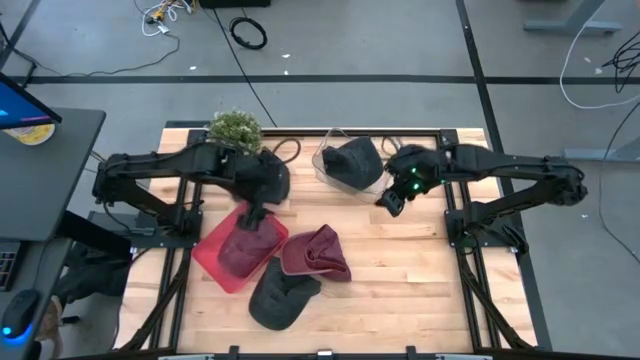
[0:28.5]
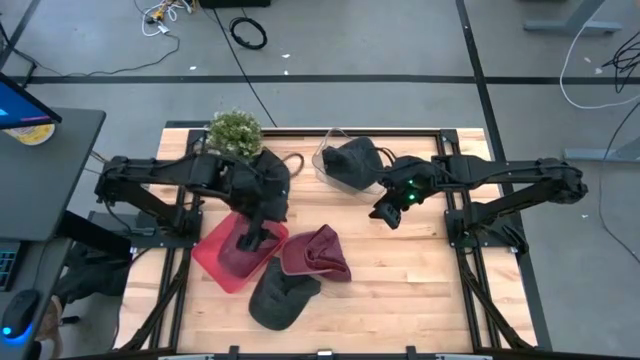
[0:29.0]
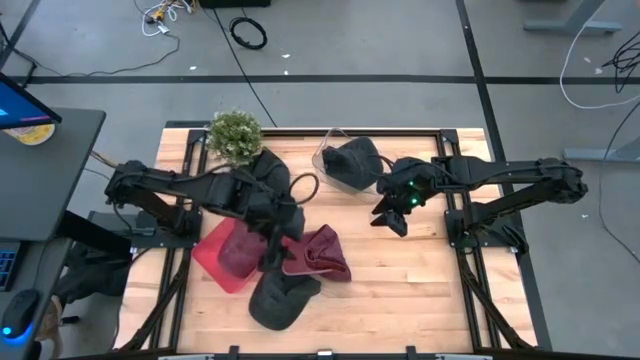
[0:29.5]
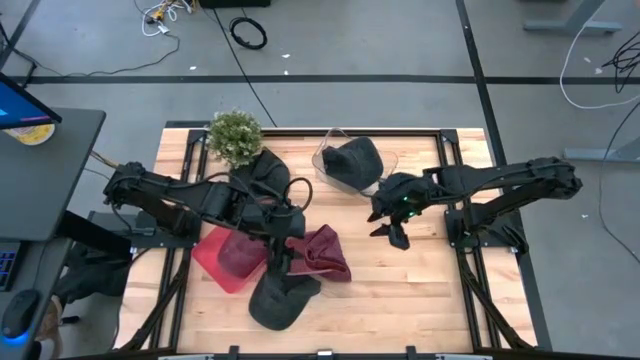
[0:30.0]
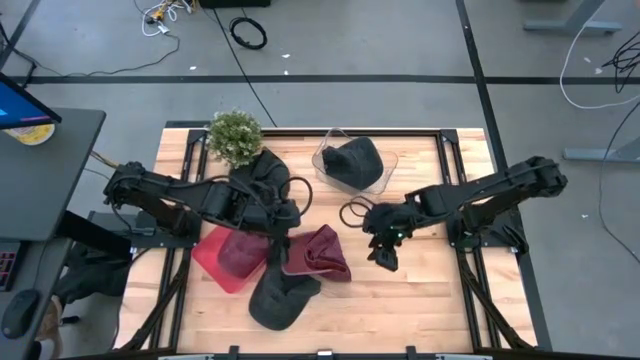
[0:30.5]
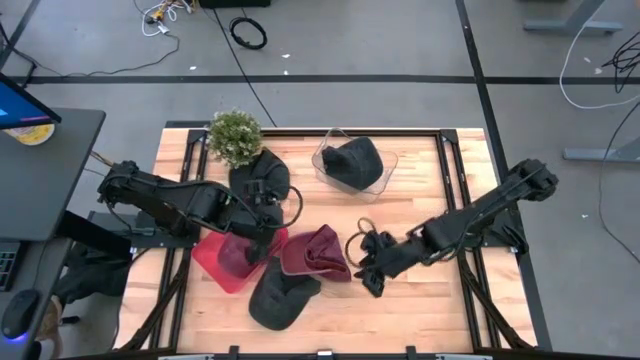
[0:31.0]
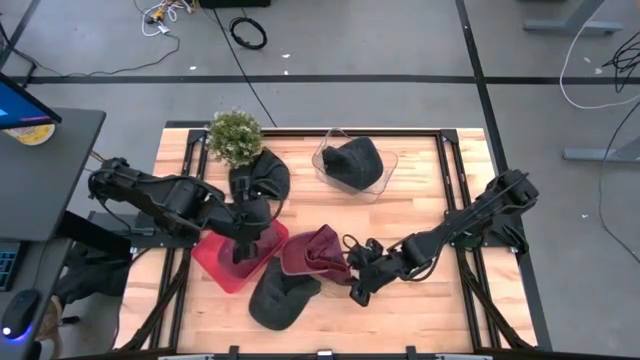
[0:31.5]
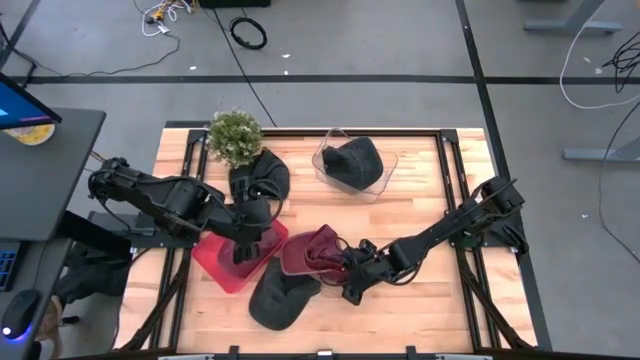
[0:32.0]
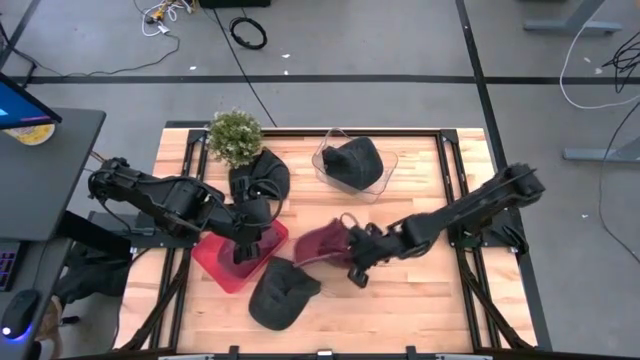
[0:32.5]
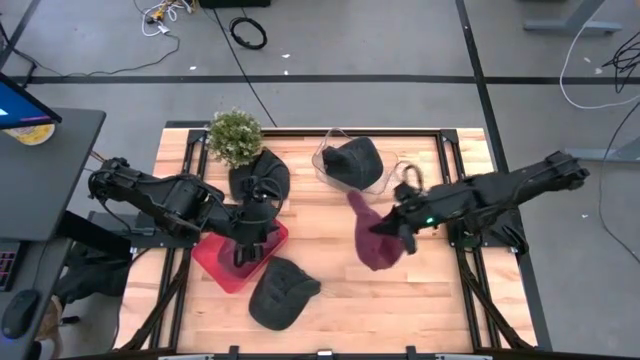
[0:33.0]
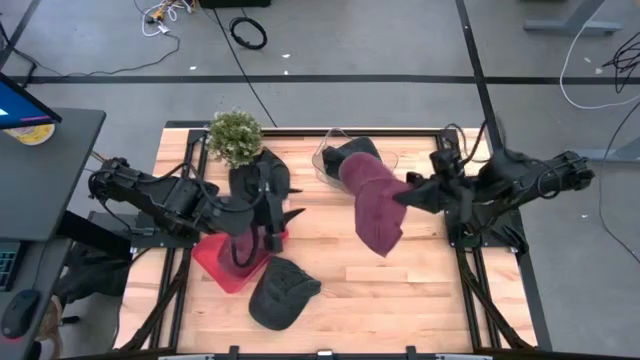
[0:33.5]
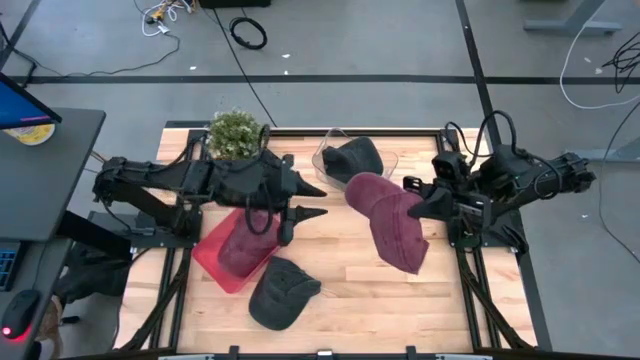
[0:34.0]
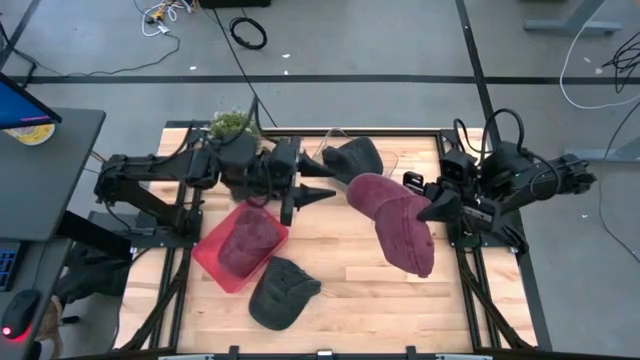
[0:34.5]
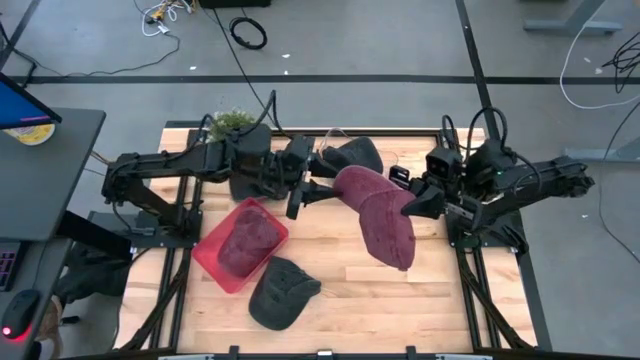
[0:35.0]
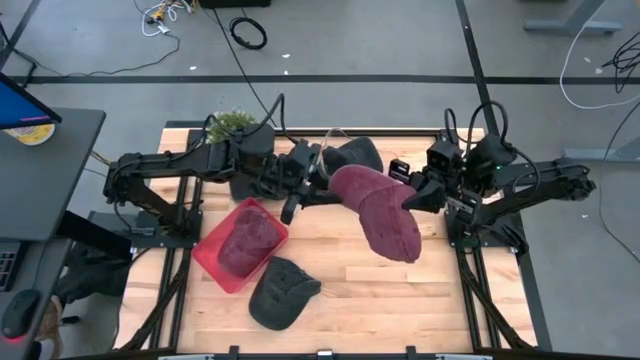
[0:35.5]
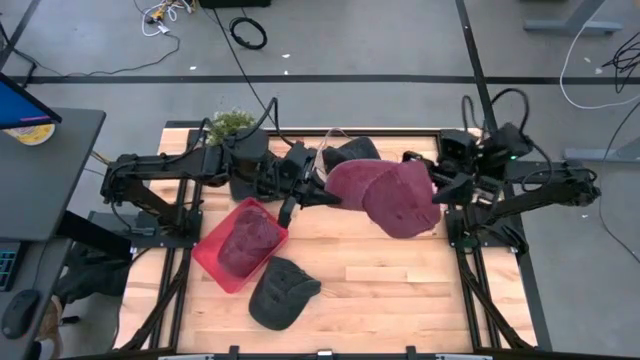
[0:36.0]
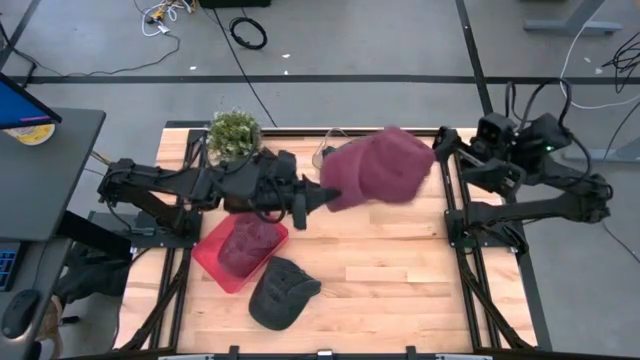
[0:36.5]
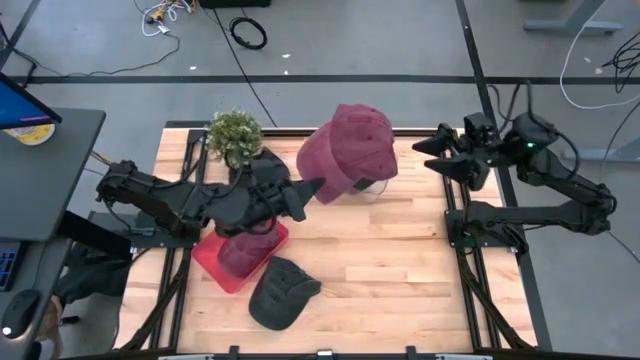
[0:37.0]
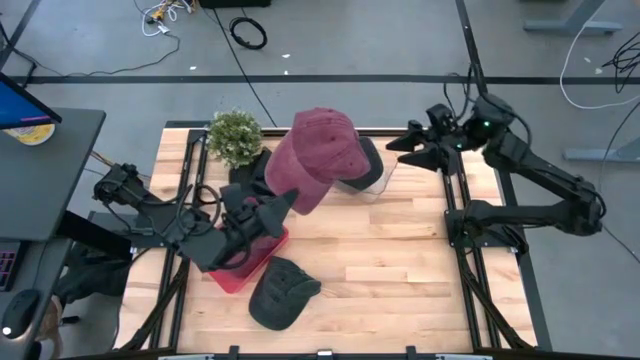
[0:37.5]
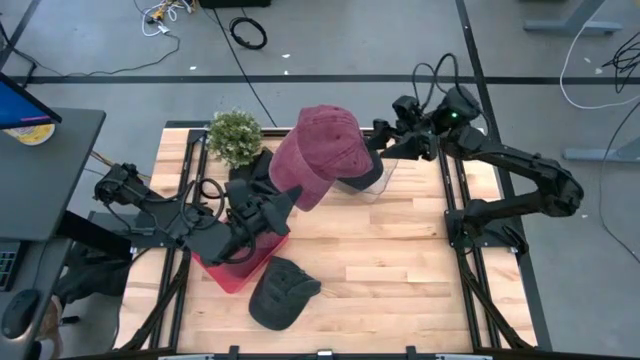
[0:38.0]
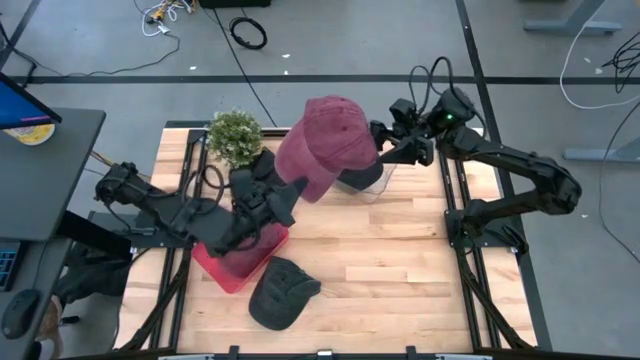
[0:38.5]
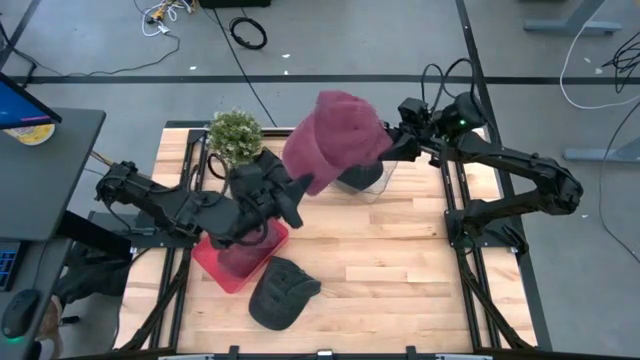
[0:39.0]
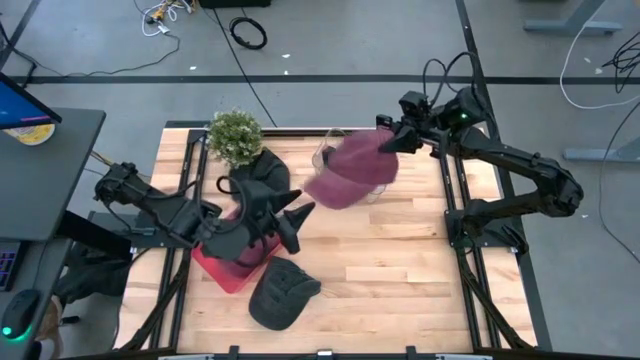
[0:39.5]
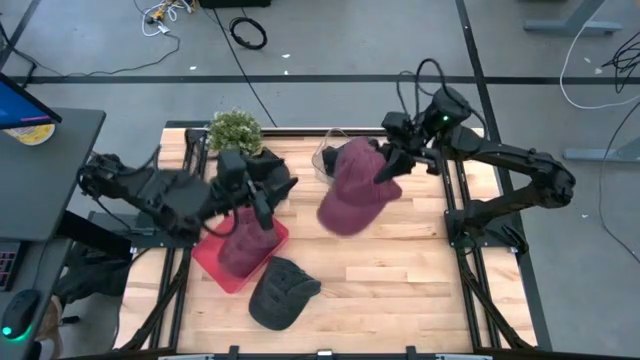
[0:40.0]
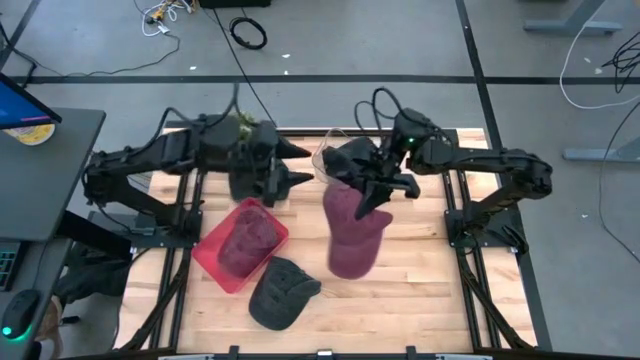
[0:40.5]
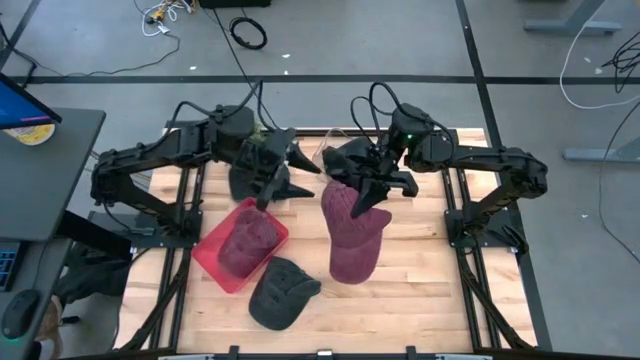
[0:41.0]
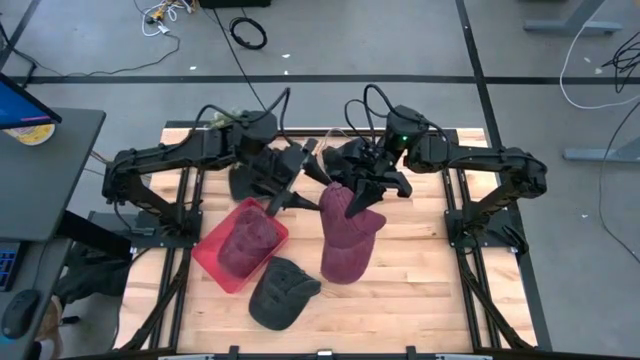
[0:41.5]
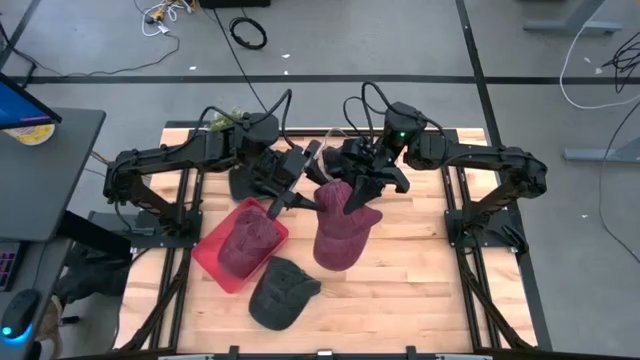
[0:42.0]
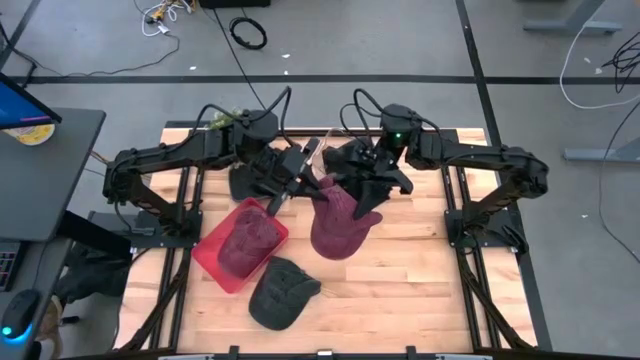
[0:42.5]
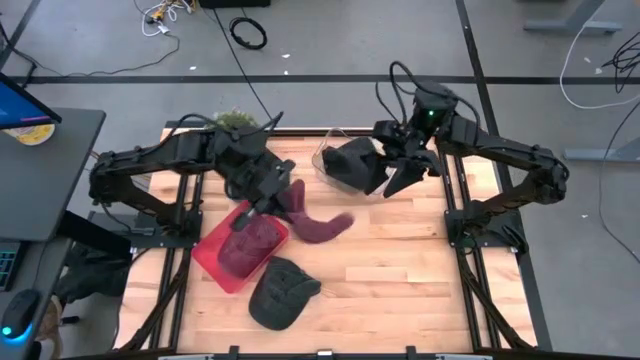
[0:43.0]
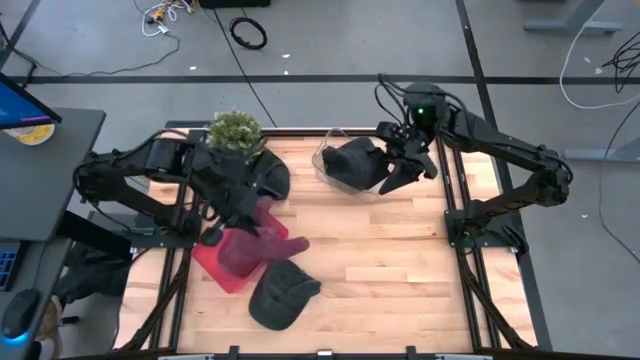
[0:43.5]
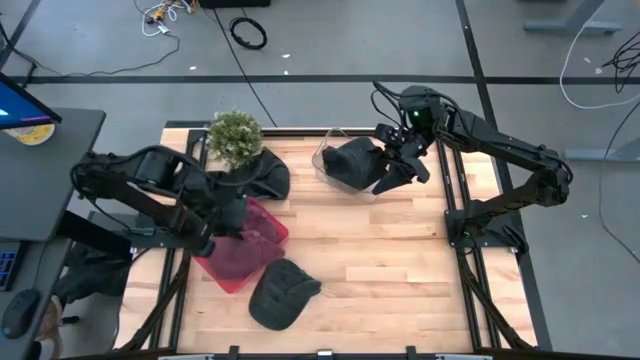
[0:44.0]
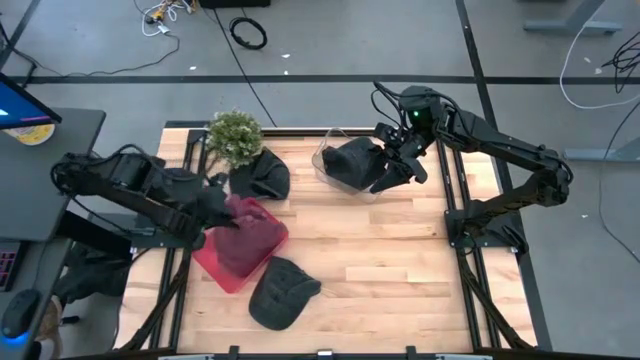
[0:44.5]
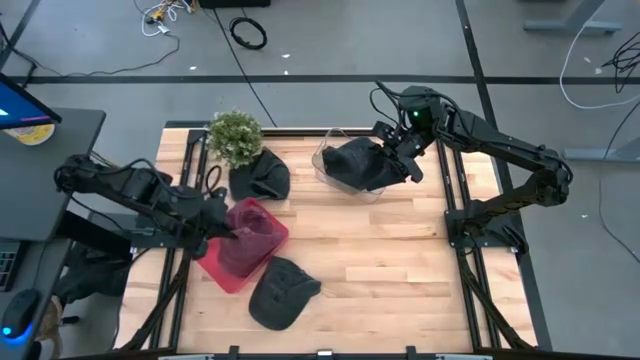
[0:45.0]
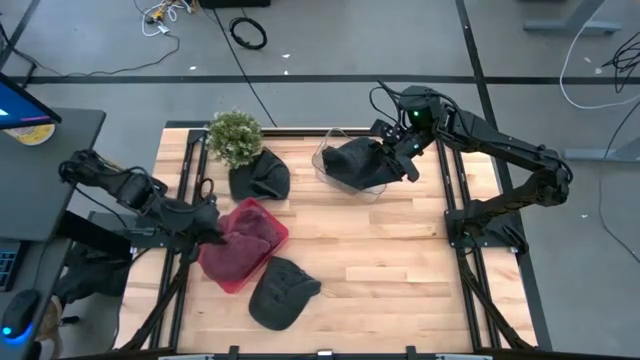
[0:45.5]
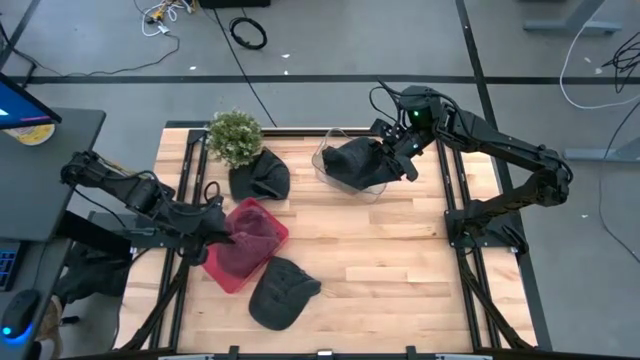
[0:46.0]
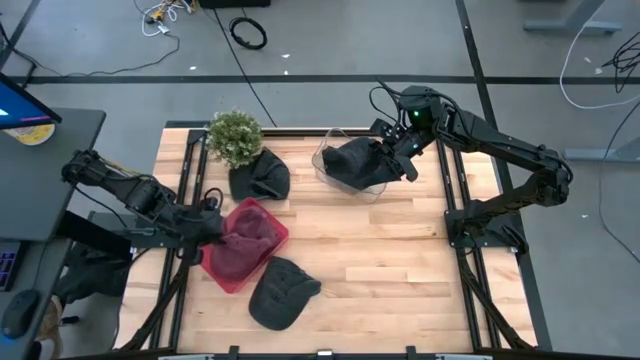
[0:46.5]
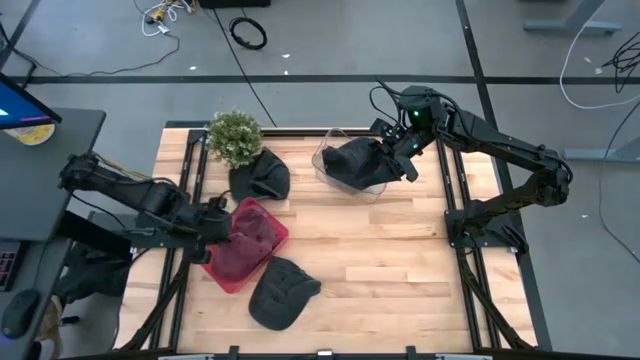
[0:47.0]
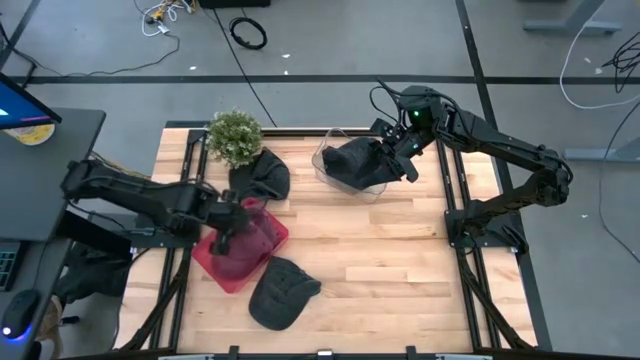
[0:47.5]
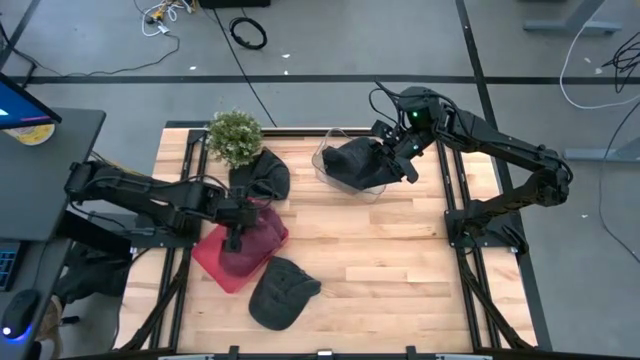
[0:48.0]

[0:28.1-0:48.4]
Task: Pick & Place hat
Put the red cap into the red bin

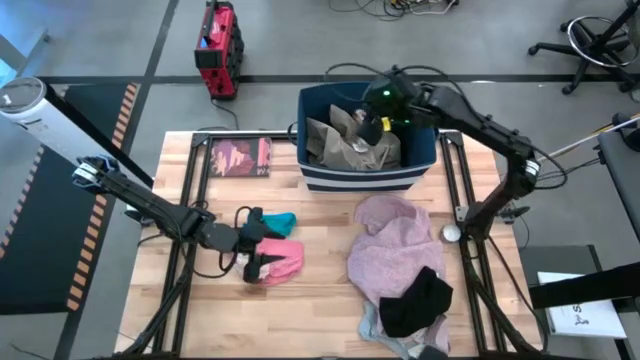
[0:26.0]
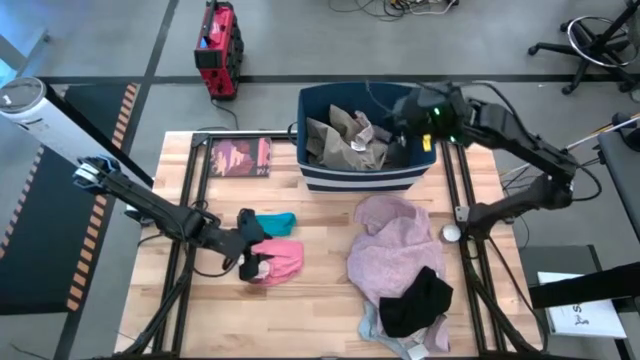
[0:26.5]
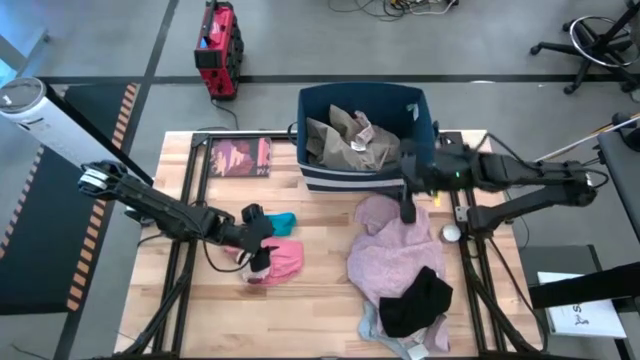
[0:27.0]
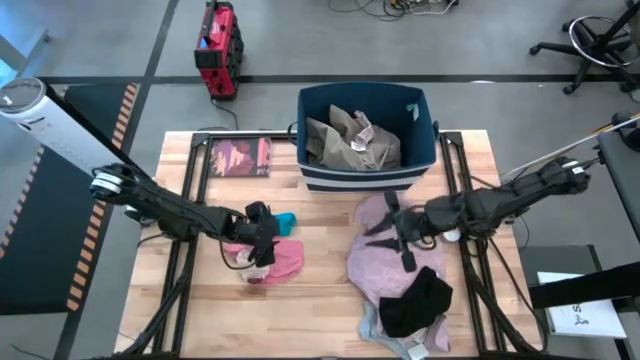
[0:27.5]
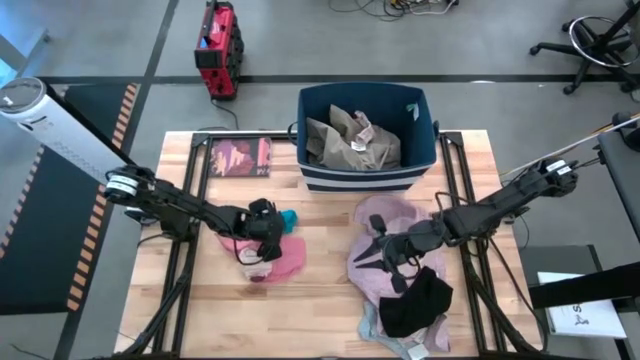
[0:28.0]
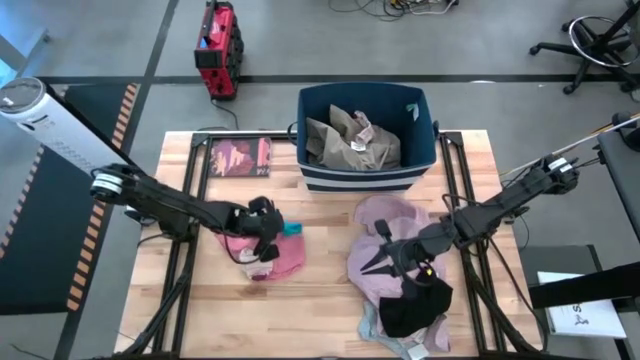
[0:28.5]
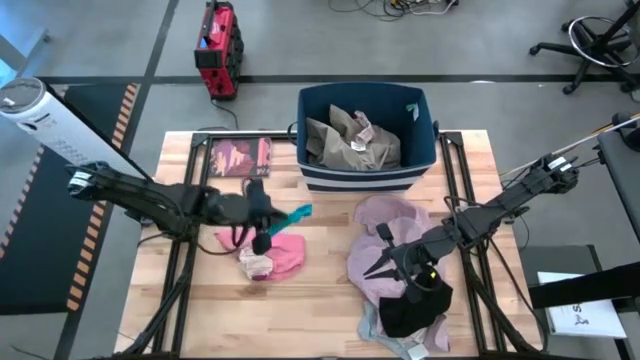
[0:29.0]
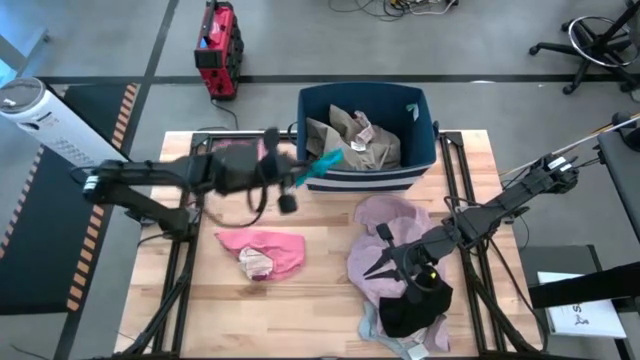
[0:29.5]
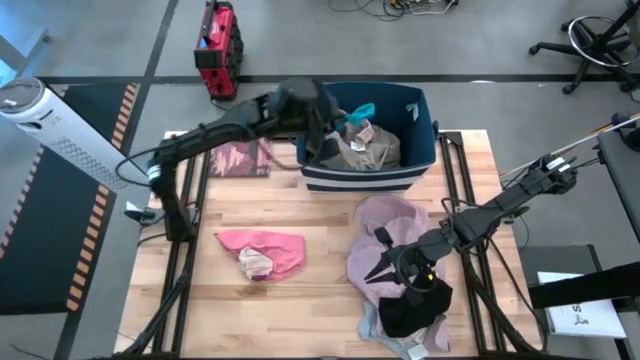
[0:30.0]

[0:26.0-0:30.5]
Task: Sort clothes
Put the blue sock into the blue laundry bin
